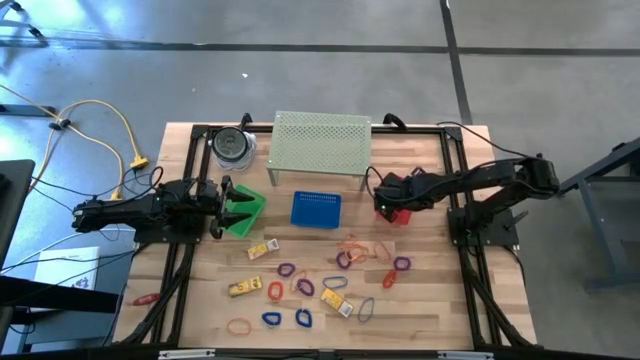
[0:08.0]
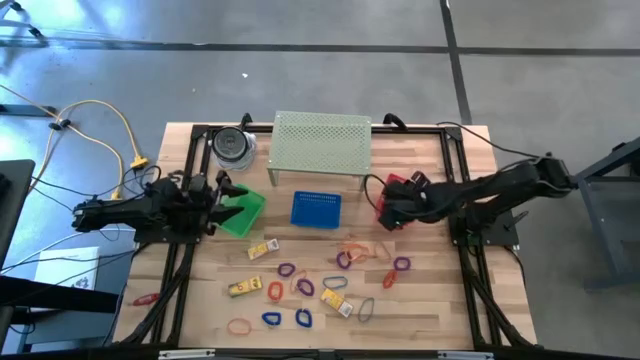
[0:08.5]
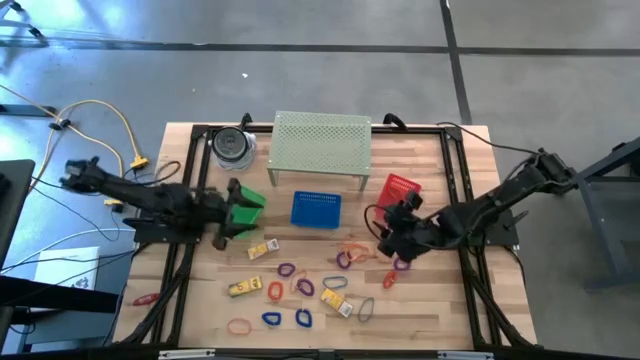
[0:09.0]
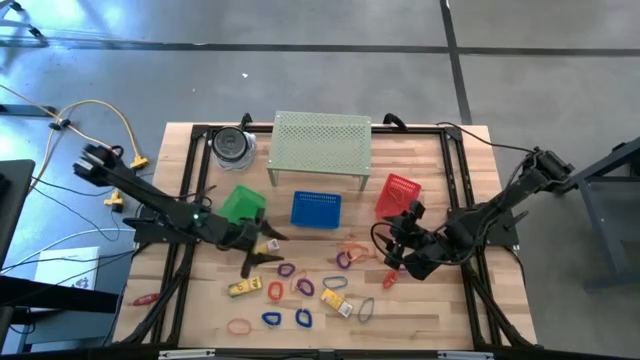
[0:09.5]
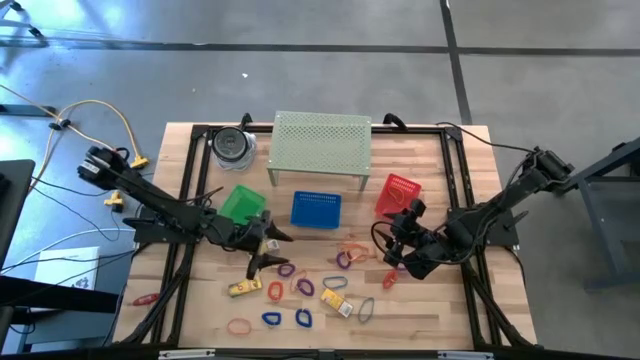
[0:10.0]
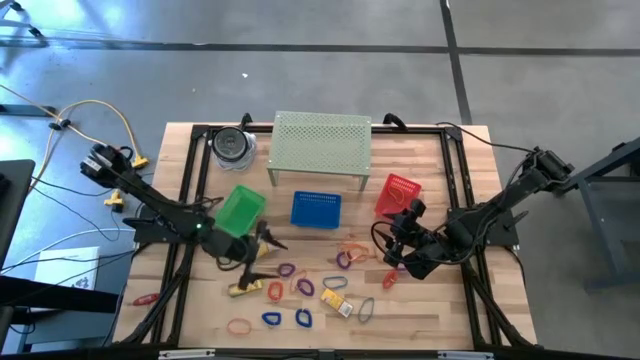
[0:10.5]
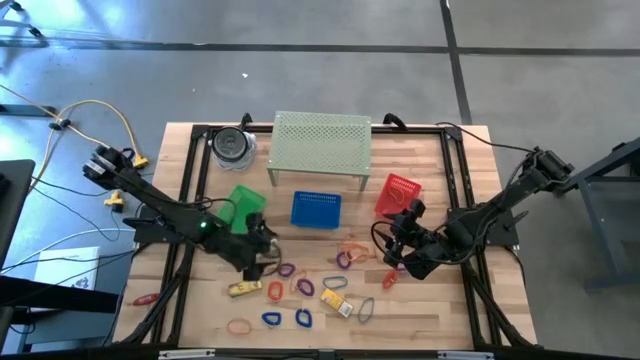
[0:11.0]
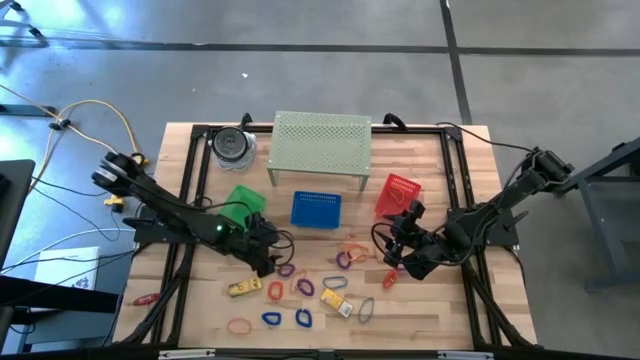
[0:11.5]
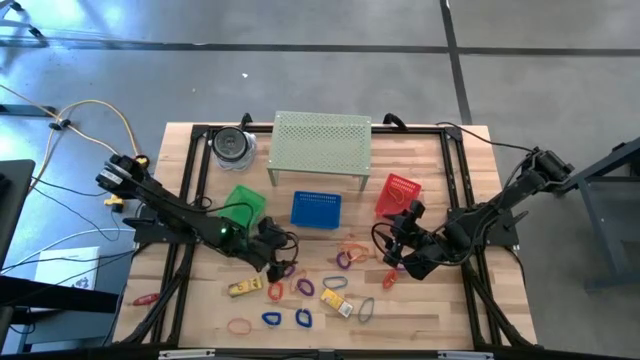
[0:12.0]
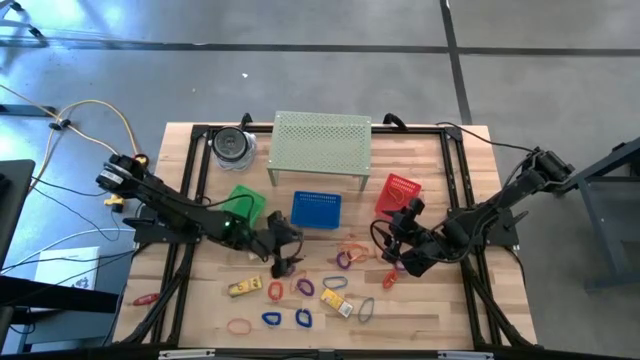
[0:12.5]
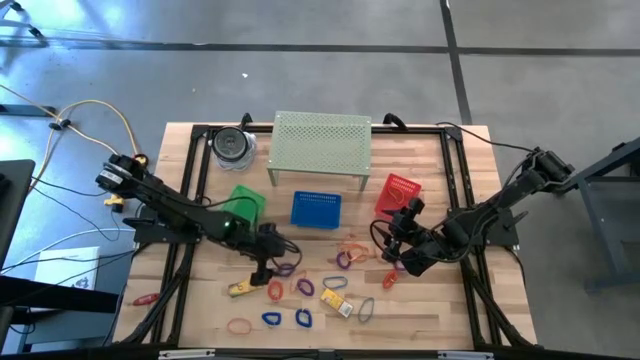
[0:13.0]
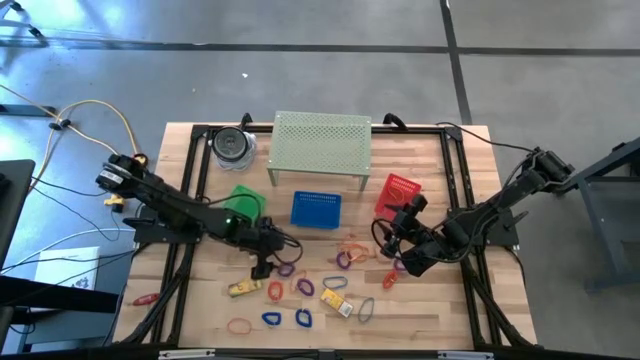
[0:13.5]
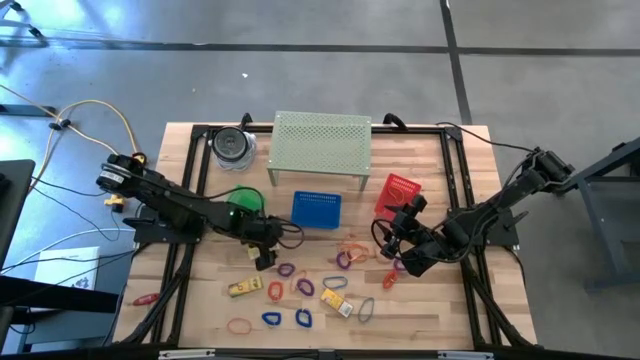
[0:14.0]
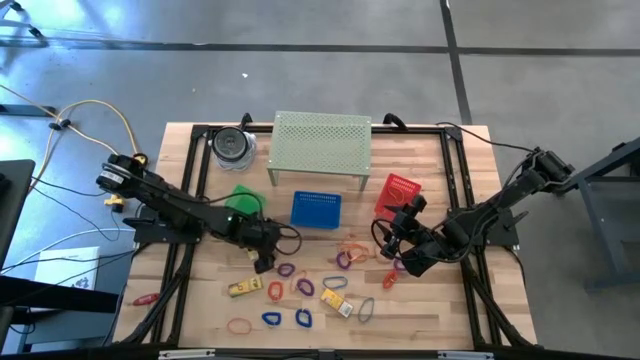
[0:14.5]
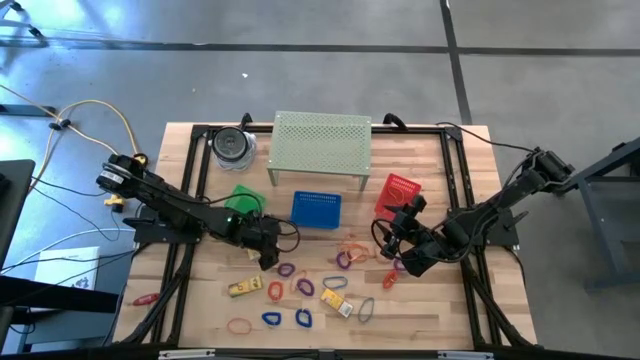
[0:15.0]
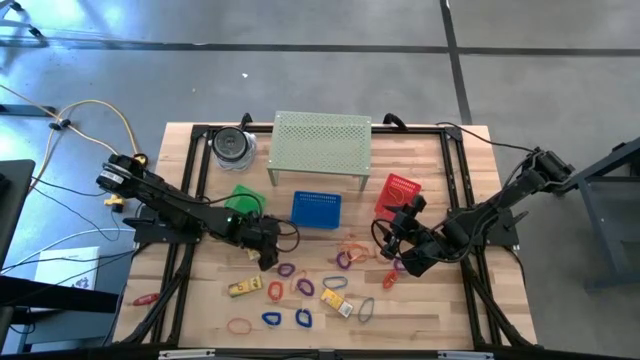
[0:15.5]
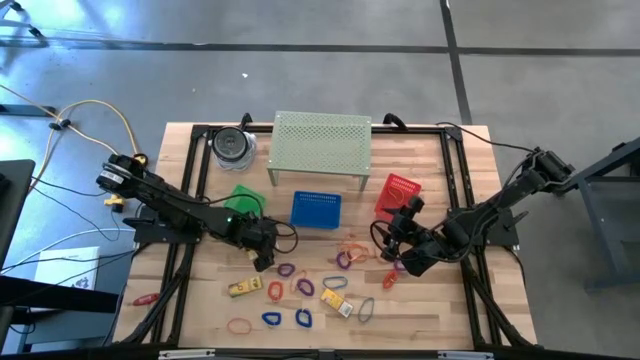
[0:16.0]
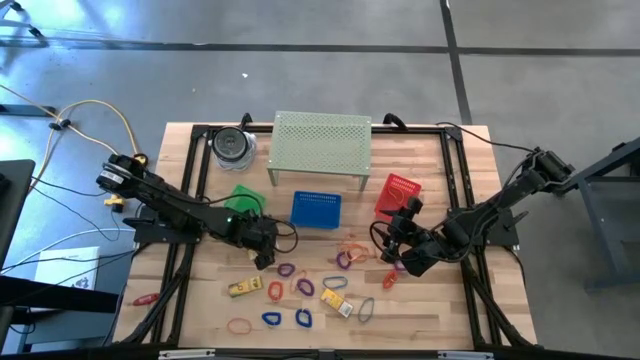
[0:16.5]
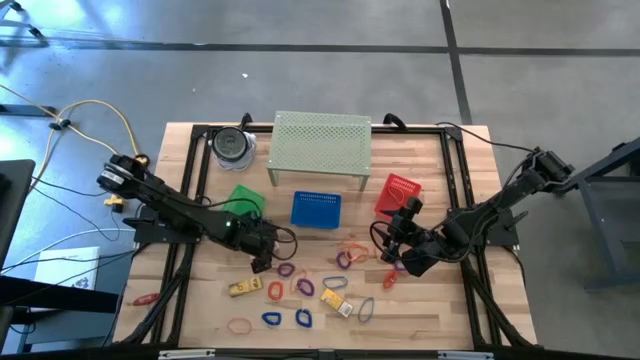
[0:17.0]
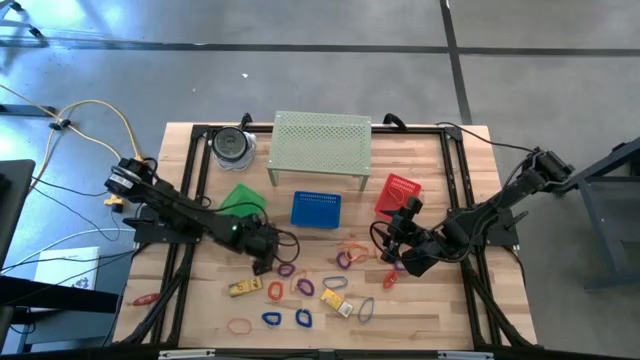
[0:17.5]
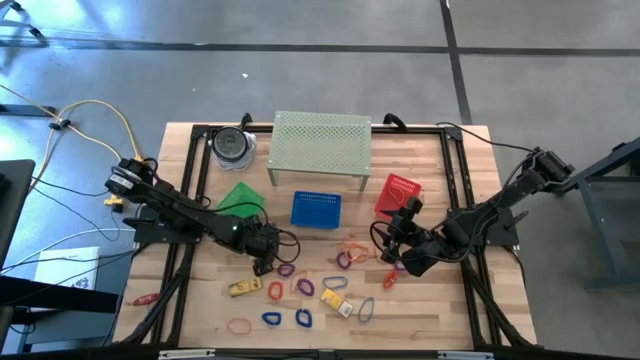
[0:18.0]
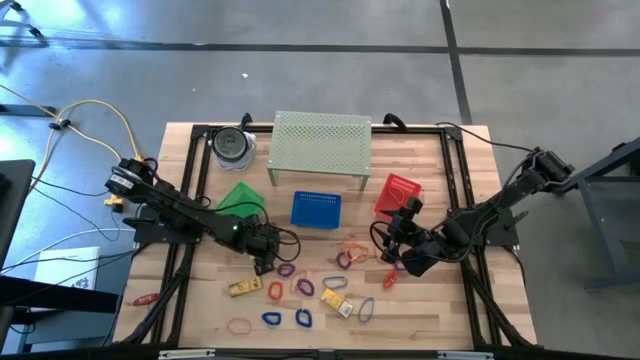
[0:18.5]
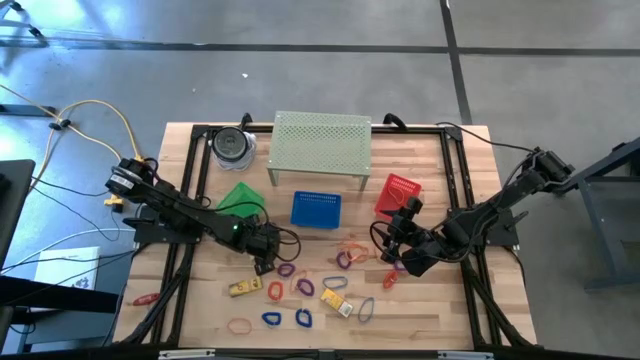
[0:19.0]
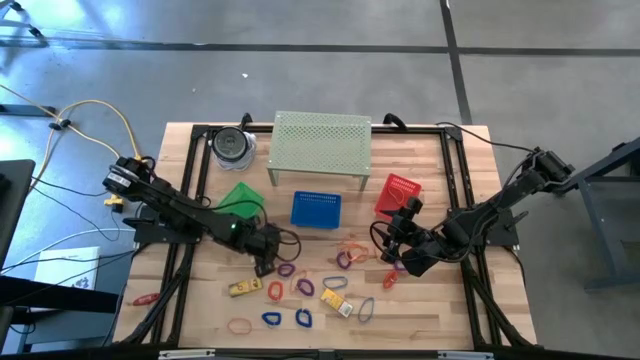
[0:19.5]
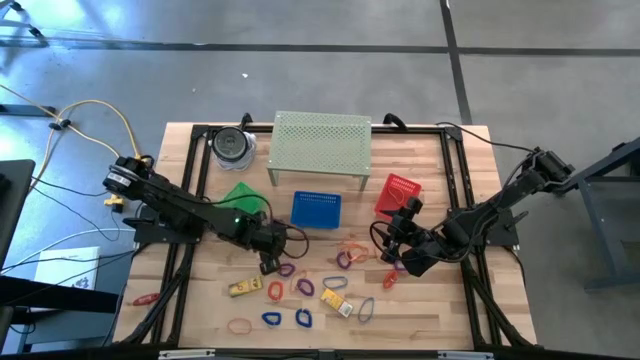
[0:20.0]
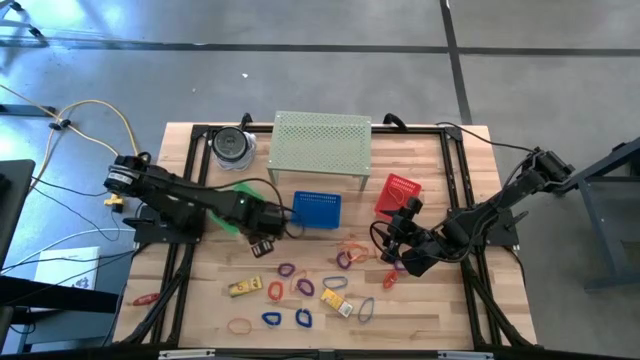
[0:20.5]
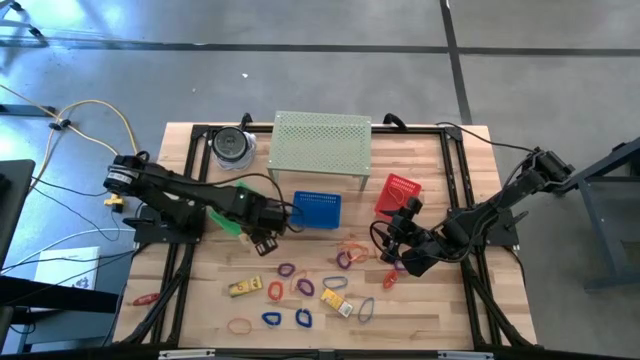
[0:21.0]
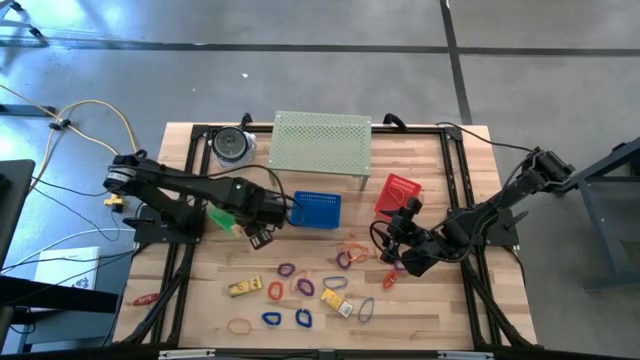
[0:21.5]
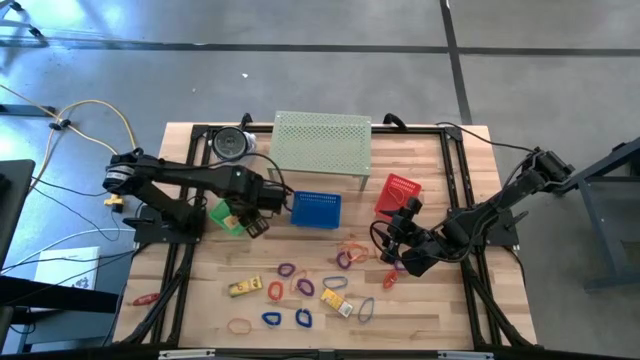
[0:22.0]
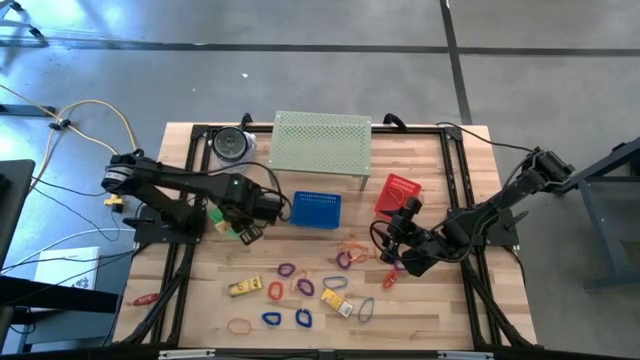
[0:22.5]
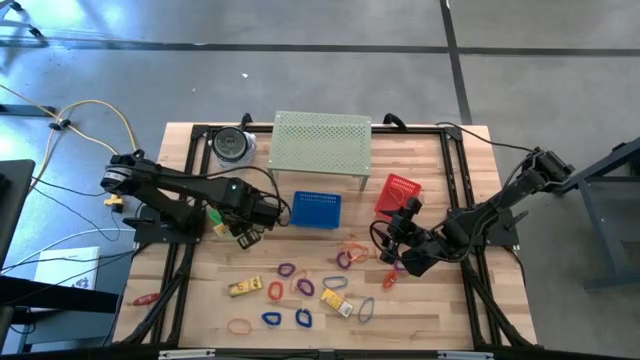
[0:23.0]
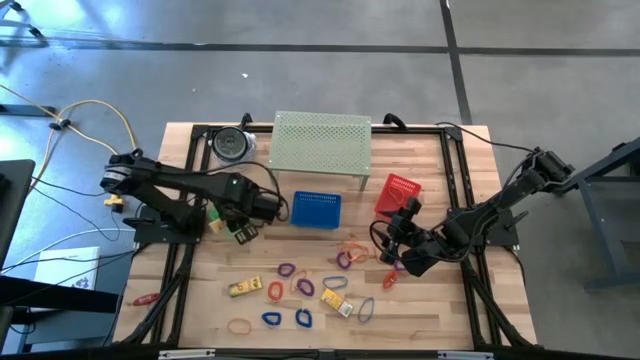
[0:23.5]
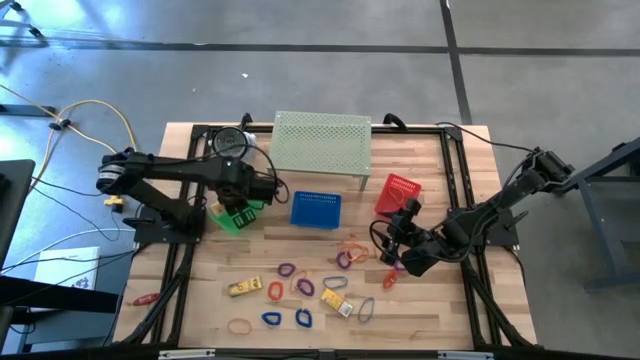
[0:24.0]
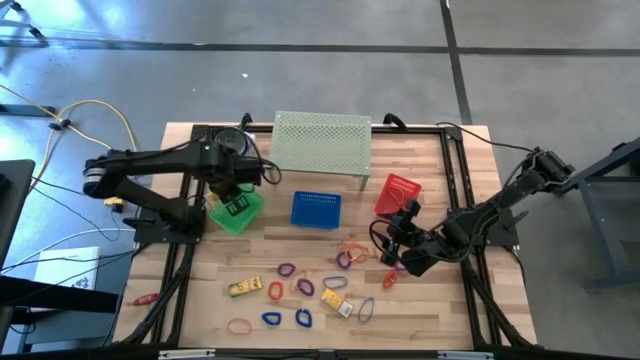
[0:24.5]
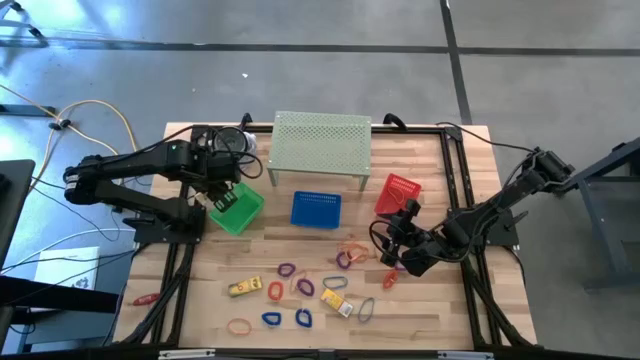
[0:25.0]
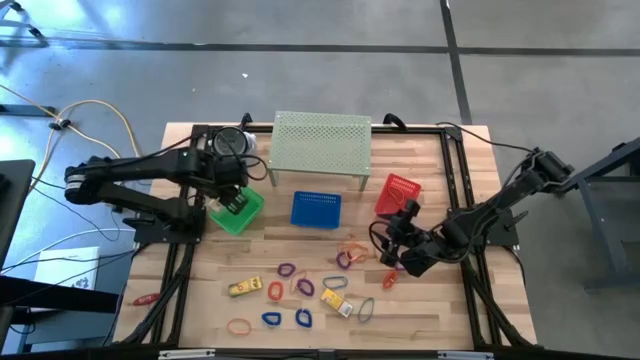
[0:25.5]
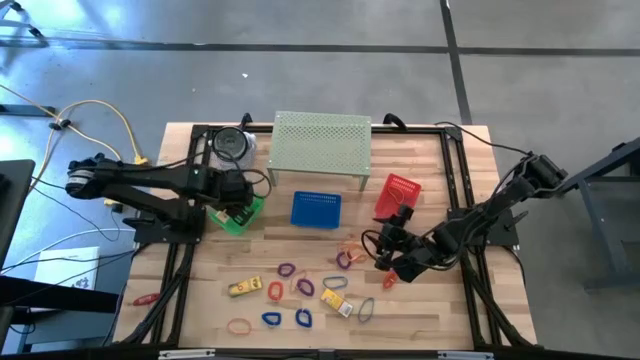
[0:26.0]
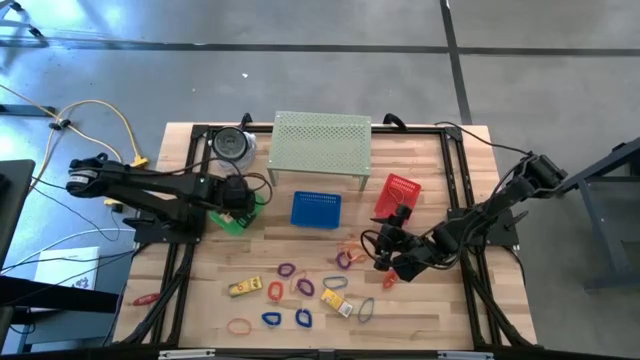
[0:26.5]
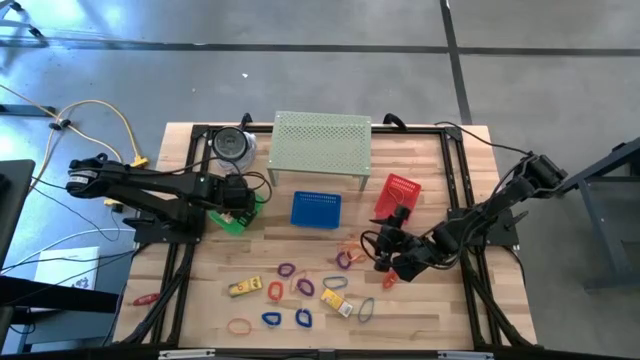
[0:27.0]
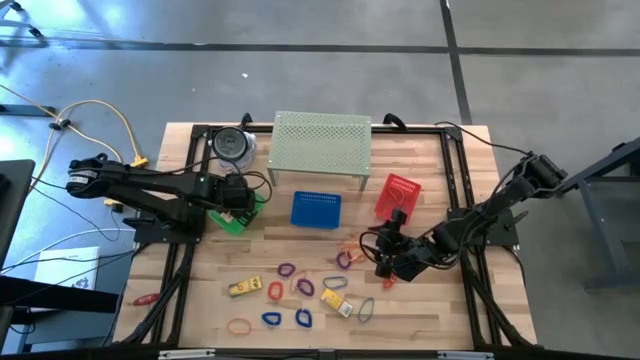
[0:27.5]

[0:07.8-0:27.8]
Task: Pick & Place Office Desk Supplies
Put the crayon box into the green bin
